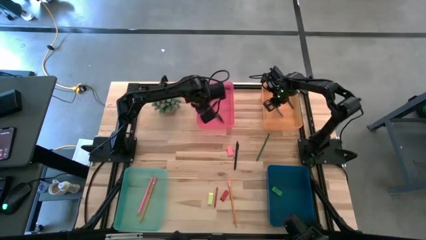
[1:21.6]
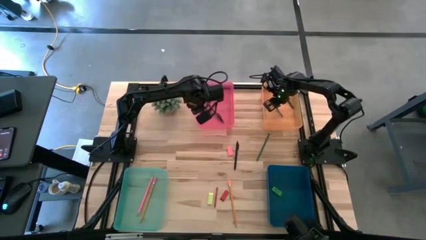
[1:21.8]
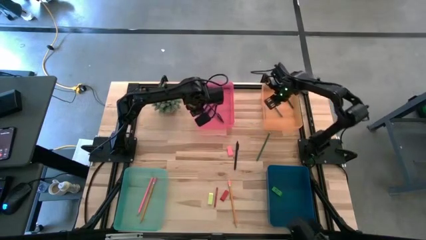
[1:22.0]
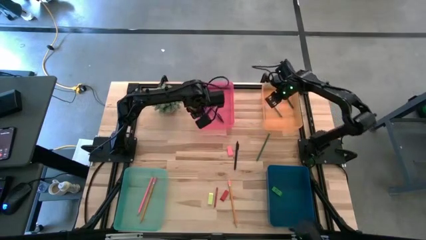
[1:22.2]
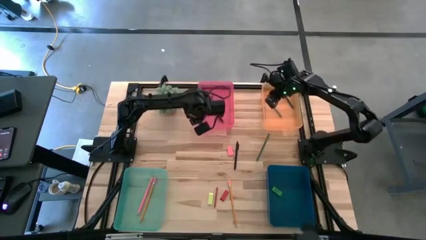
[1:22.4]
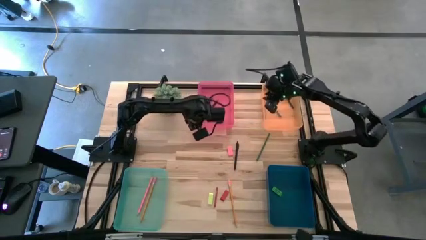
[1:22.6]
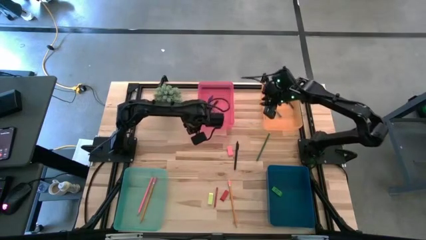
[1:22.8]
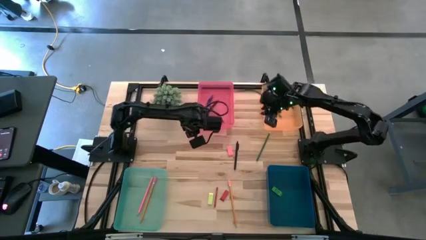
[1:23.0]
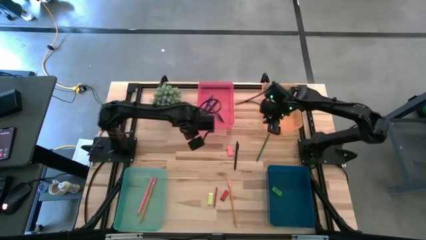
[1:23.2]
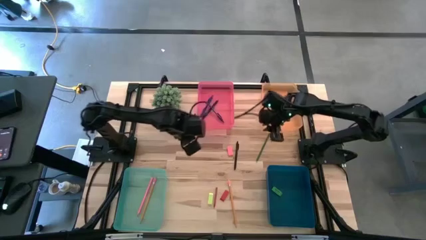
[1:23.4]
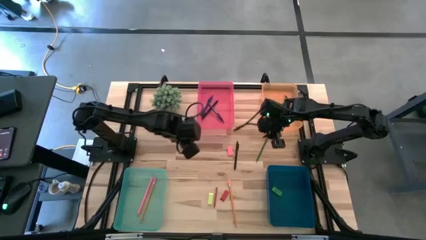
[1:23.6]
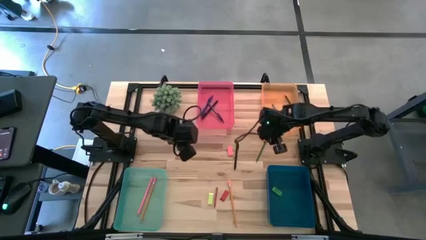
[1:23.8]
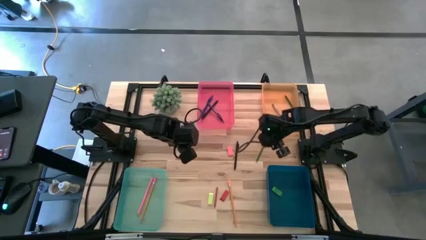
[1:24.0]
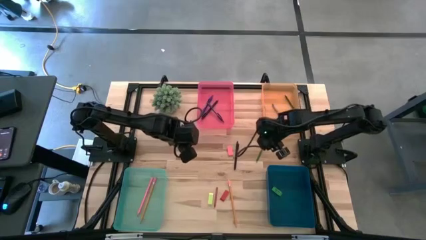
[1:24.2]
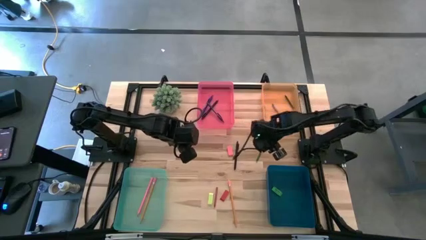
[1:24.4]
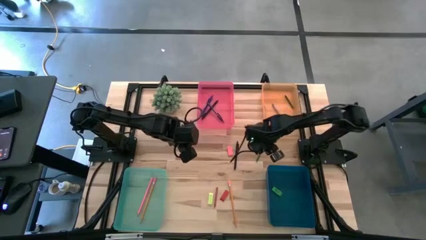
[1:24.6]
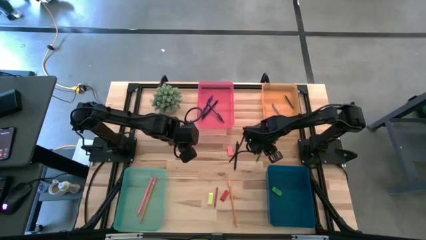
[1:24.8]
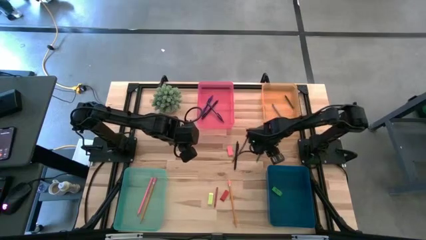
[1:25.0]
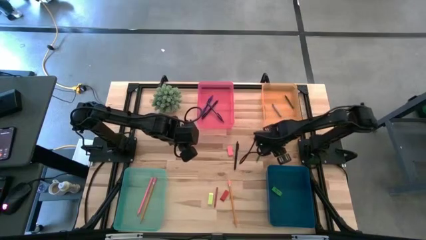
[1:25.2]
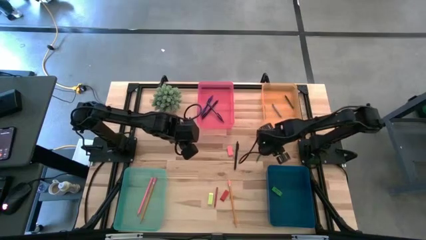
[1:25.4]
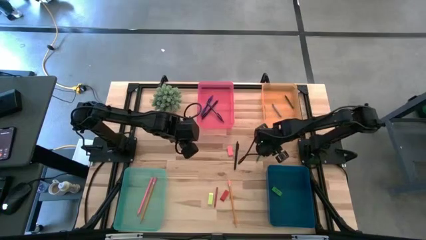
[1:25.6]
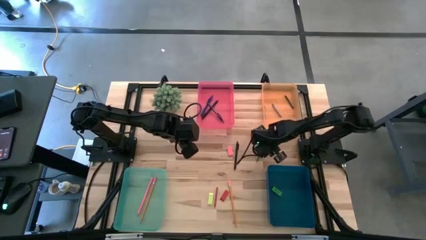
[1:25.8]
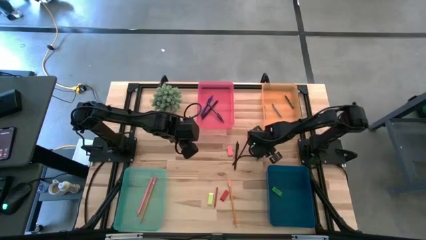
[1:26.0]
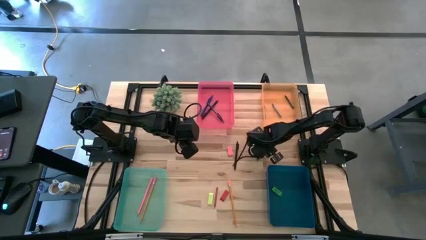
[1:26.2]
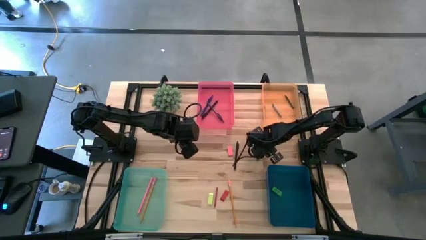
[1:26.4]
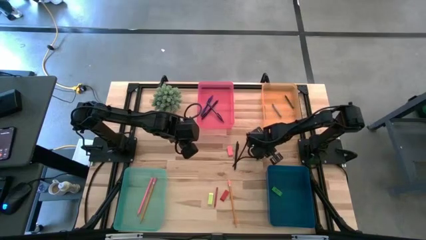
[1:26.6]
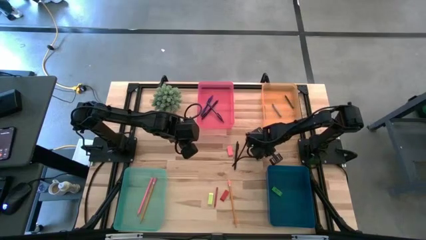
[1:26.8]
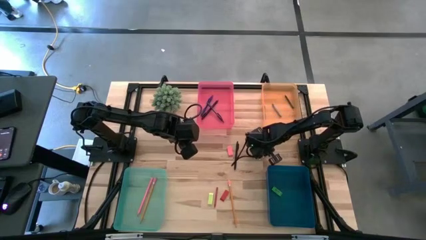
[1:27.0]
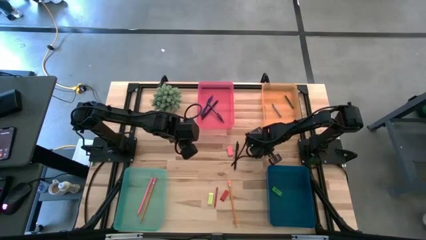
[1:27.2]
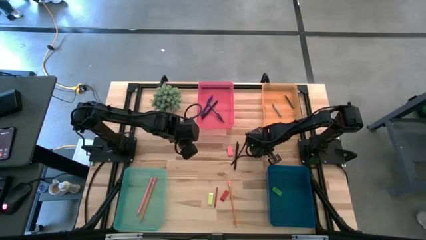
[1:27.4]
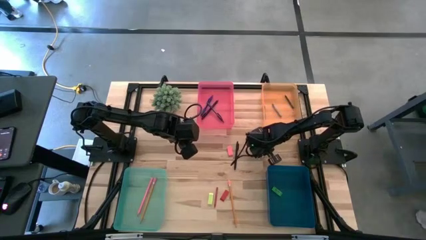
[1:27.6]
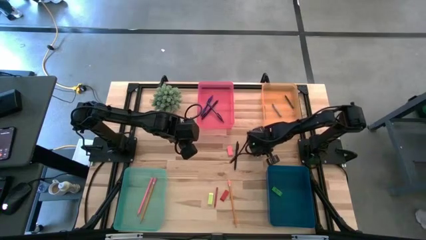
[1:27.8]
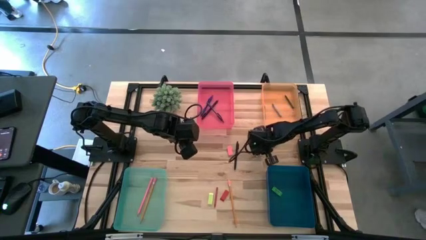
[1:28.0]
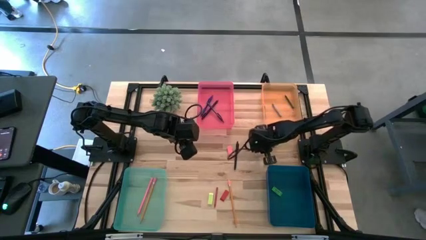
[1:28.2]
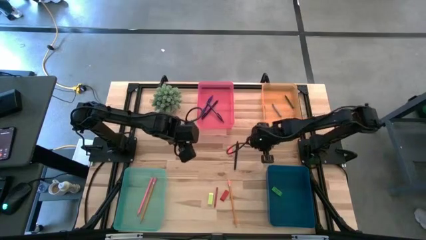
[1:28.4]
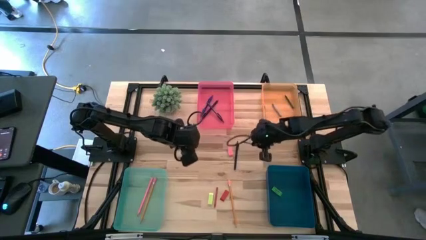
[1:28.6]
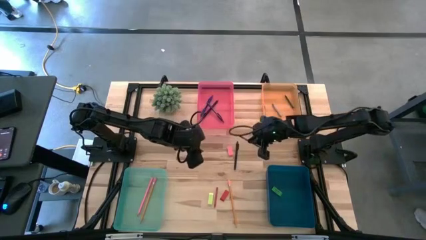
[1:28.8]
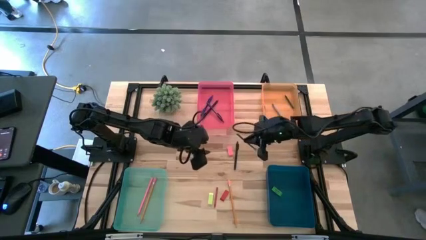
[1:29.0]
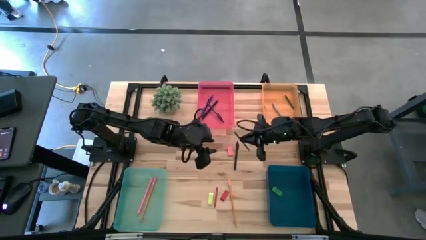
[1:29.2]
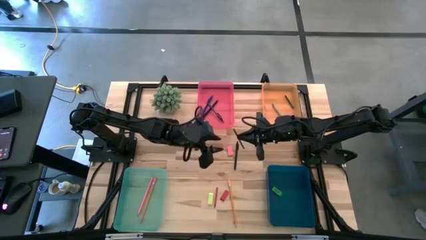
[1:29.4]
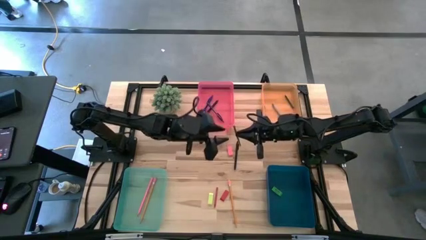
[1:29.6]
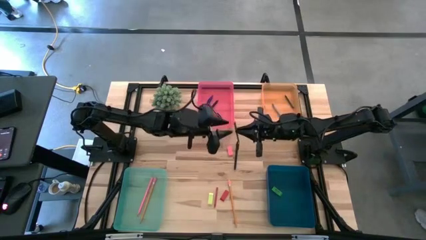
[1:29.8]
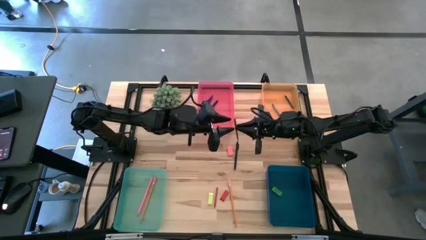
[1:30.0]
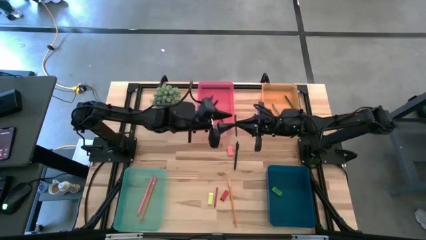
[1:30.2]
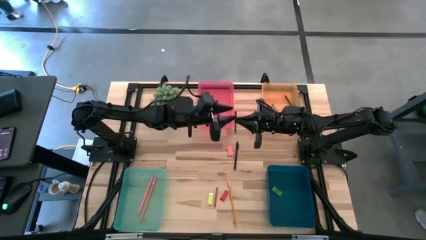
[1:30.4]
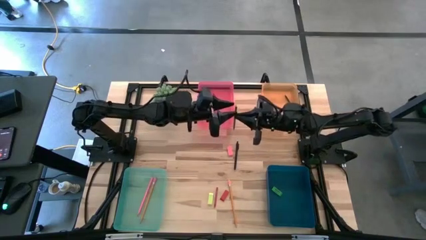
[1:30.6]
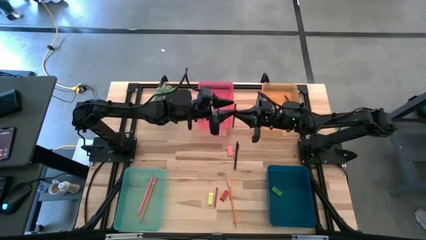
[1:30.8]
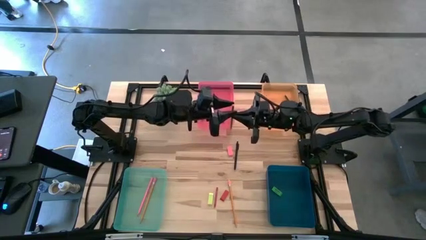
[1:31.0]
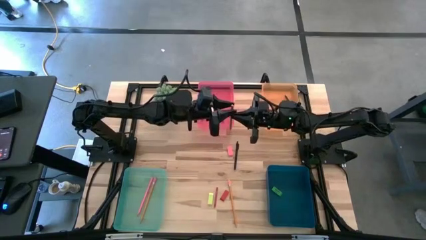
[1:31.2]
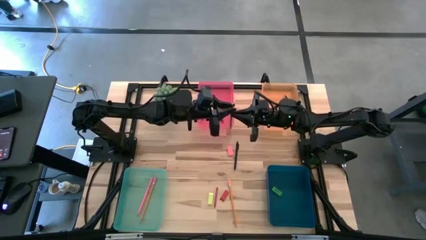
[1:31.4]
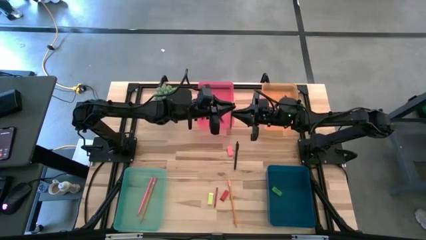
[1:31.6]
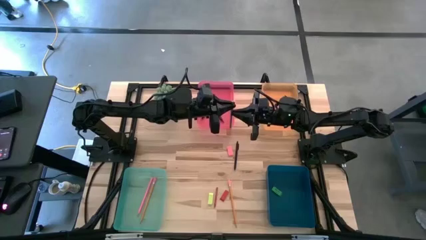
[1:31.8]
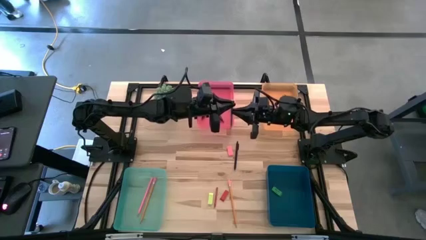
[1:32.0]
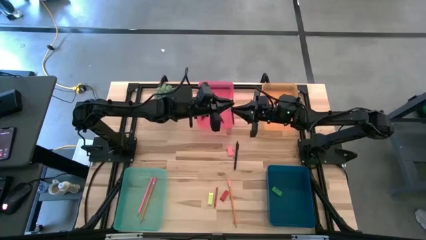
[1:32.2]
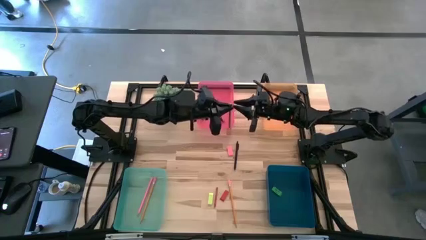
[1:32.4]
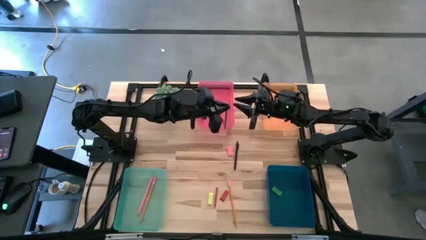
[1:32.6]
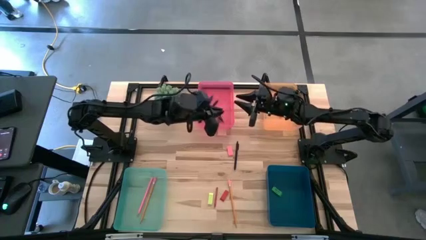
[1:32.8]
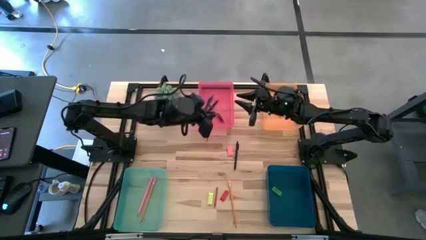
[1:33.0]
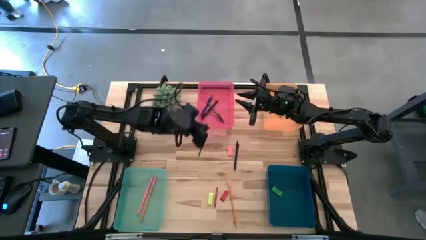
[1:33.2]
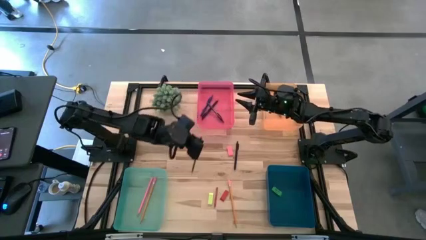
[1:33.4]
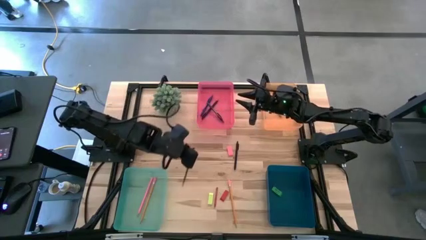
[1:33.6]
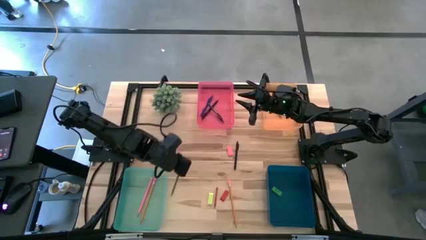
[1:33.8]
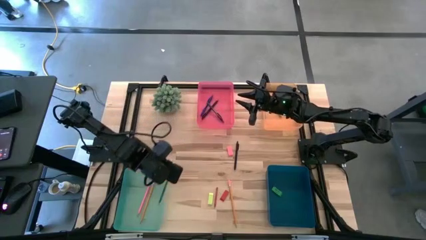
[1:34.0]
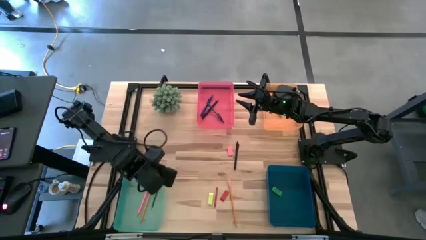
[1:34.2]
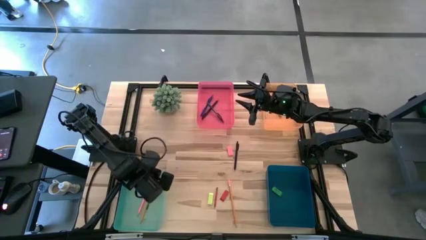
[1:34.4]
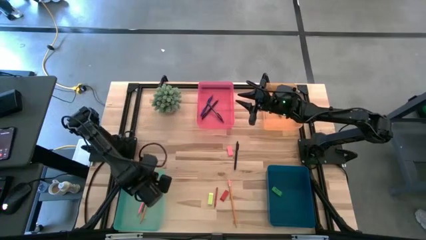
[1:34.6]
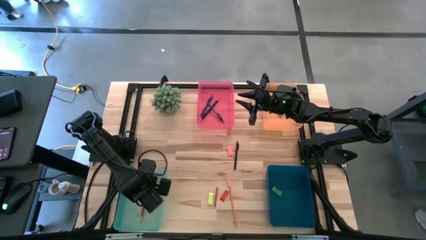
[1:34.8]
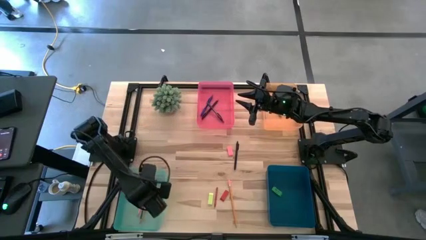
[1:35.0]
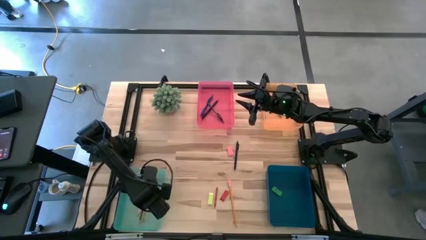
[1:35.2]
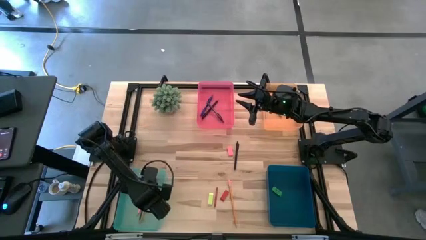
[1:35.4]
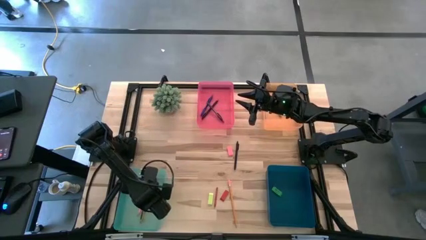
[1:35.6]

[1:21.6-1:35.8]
Task: Sort crayons/erasers/pens/pencils in bins
Put the green pencil into the green bin
